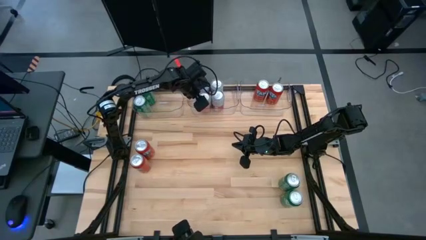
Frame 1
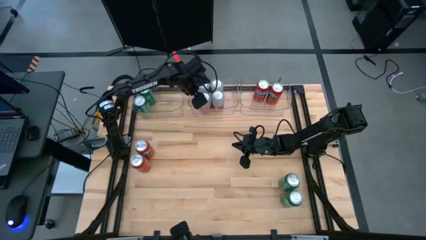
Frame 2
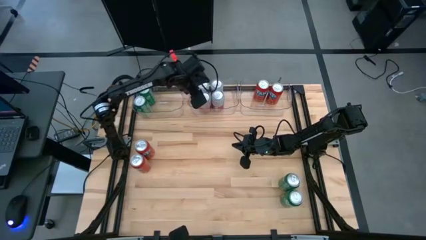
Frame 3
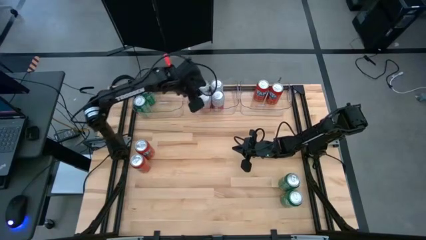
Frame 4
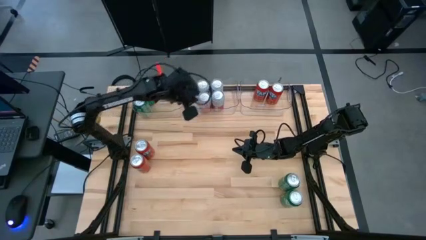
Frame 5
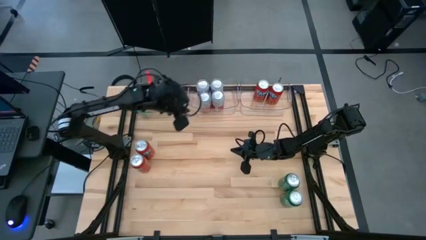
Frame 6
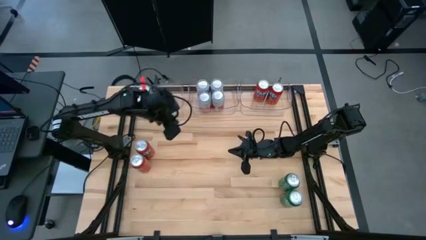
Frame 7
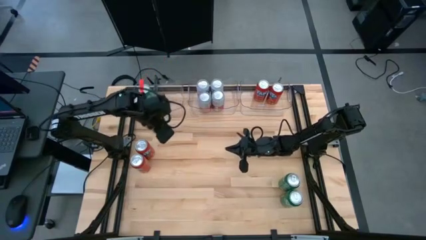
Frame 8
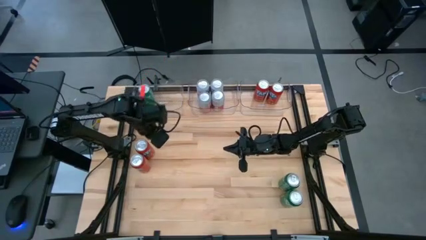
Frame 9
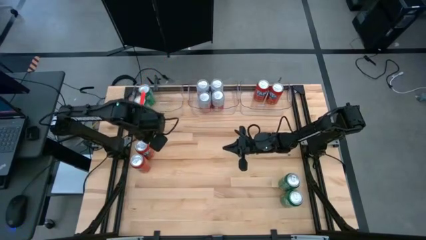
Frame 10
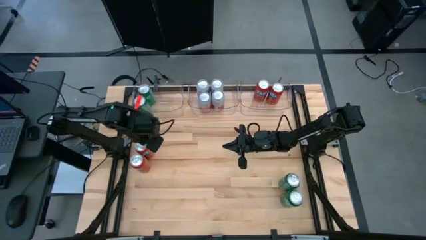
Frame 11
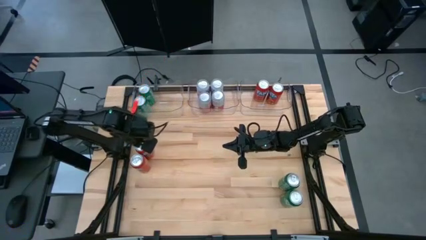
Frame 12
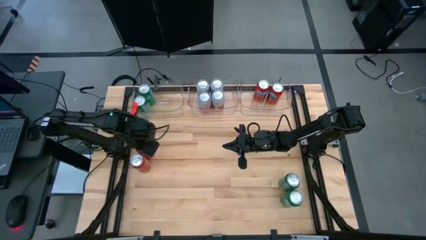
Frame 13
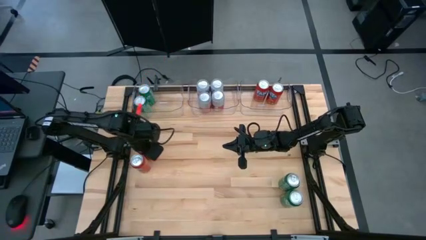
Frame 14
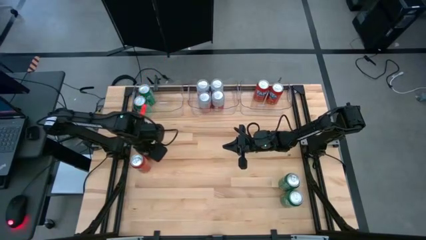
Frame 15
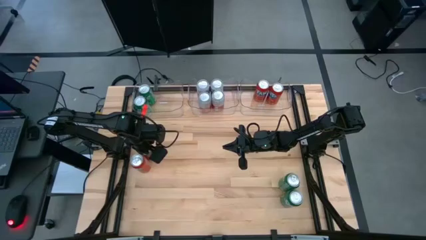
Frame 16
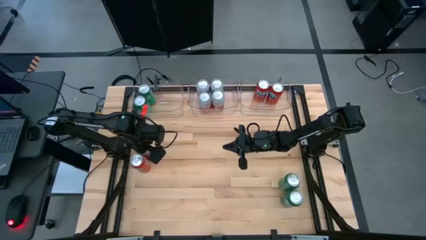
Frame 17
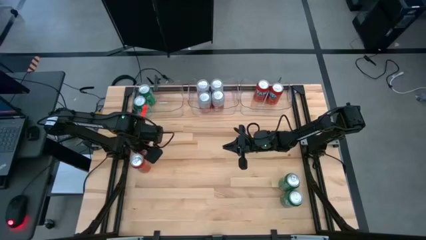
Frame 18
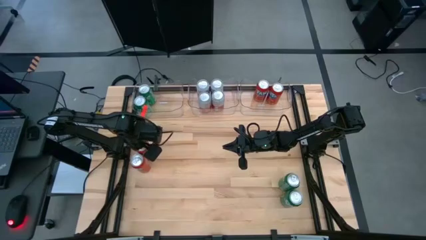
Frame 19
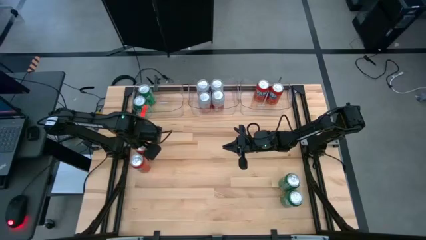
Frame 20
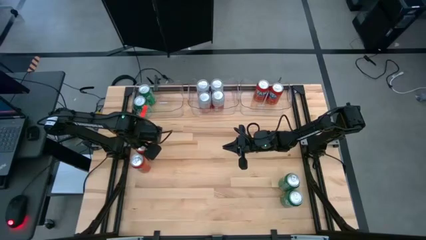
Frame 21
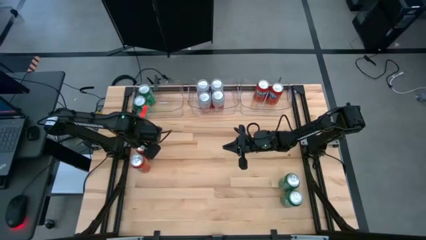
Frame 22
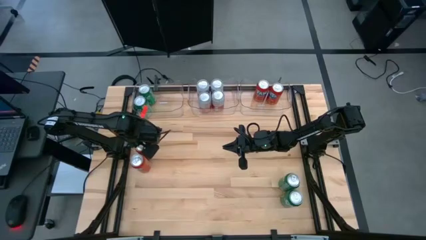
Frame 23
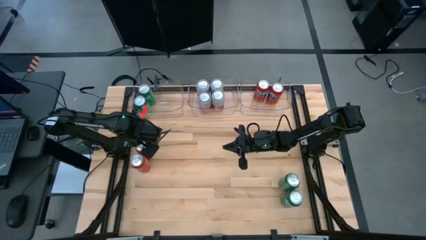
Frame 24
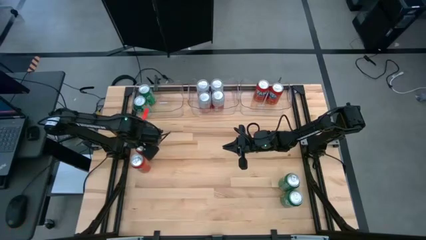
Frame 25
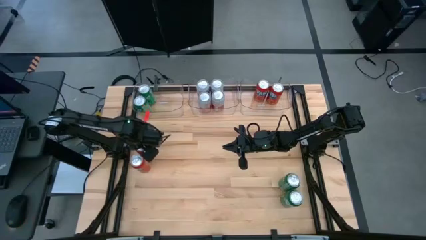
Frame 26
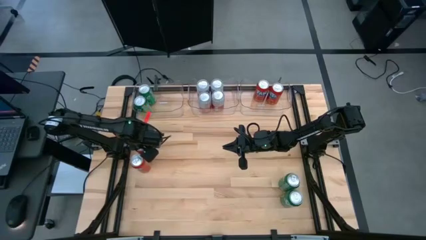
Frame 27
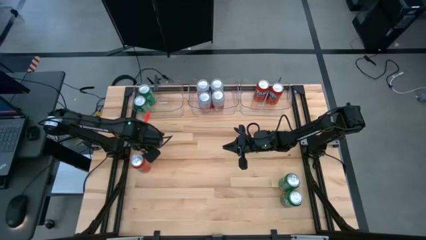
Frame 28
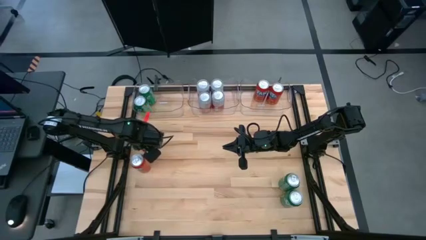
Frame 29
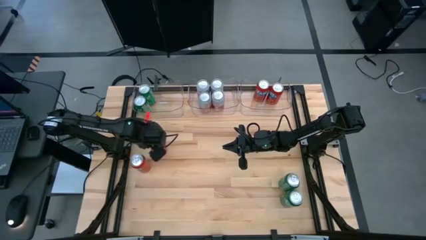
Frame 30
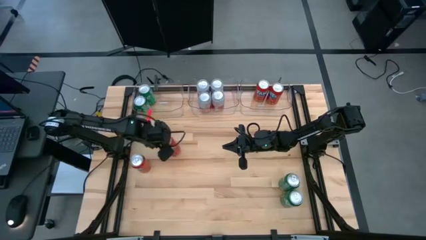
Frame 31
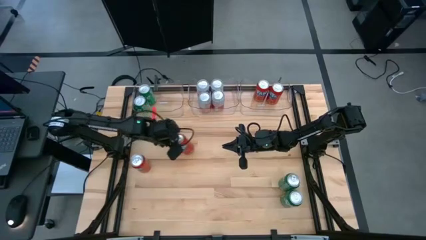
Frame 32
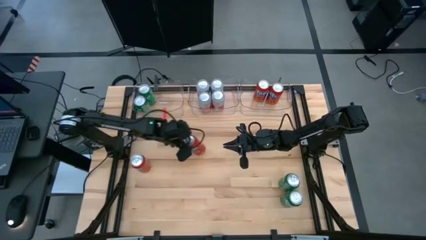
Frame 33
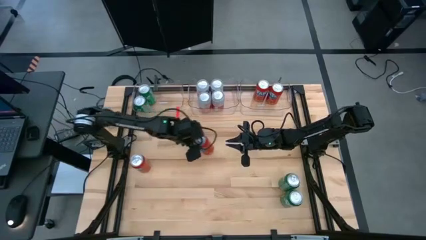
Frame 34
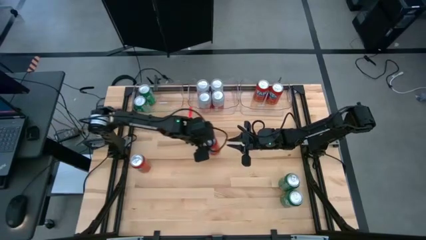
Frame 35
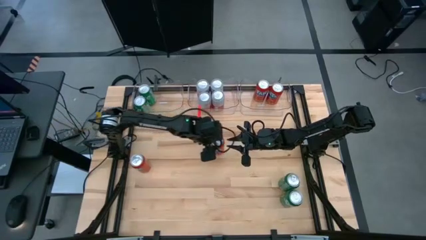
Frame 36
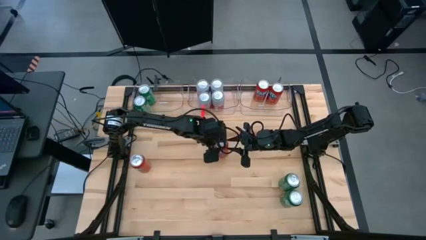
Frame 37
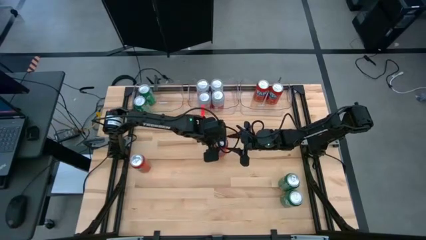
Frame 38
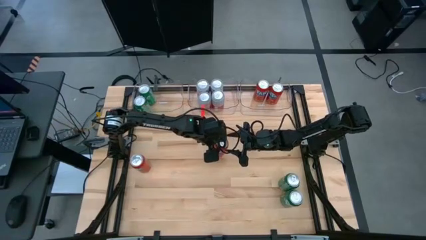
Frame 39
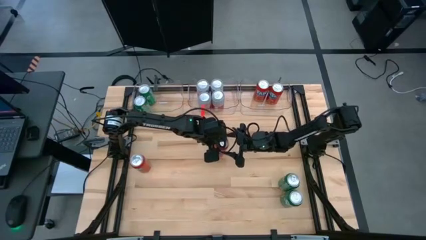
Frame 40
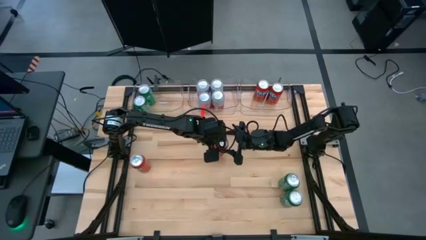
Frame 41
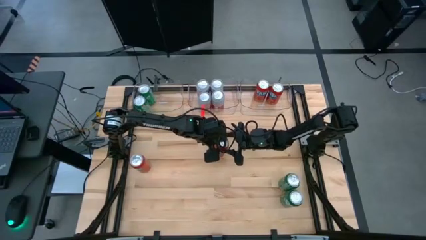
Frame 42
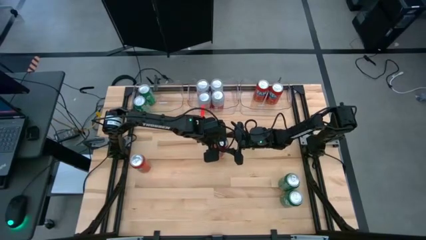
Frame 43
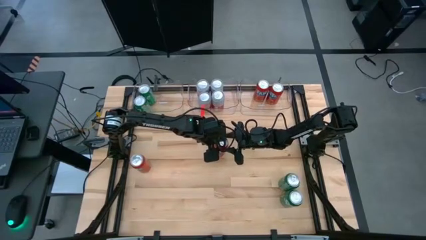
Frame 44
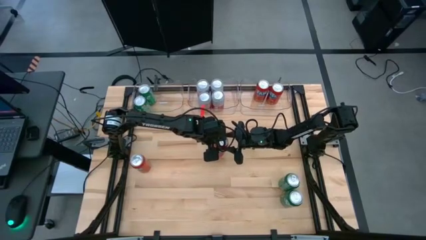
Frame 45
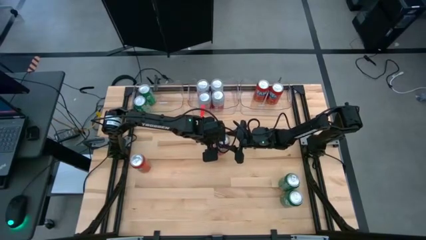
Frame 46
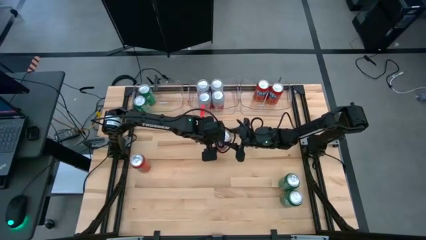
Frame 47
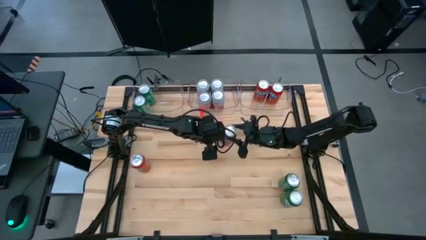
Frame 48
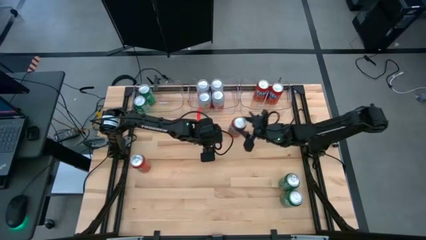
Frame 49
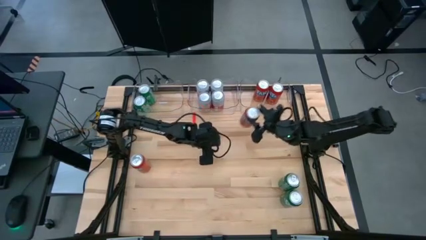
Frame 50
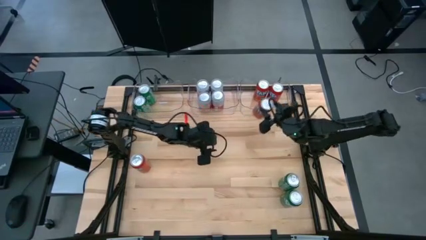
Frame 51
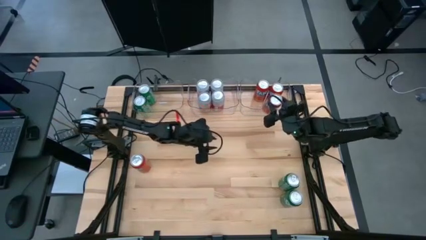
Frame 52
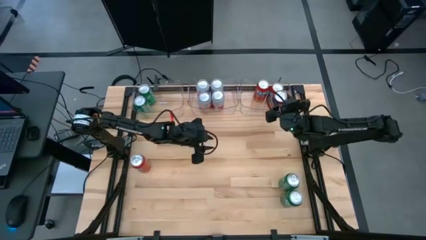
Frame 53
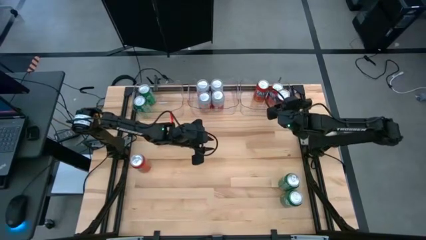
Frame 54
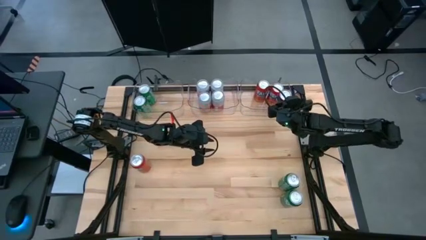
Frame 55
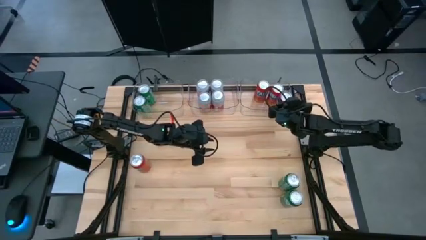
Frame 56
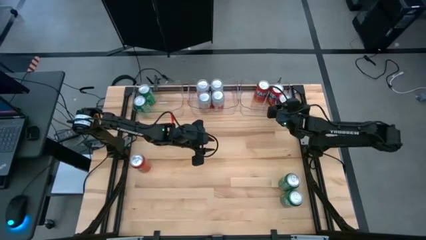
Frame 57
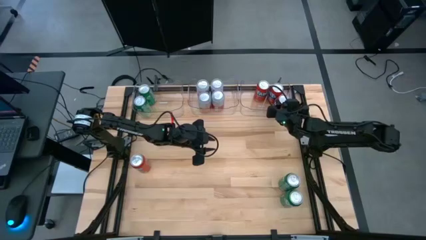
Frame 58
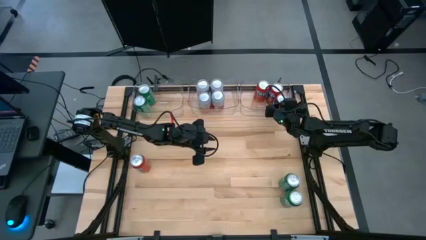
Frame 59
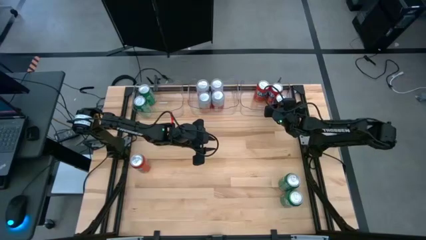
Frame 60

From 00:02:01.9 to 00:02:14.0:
Task: Sort soda cans
Put the red soda can into the top right transparent bin

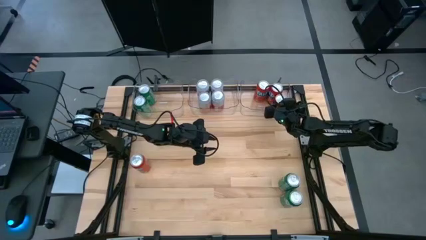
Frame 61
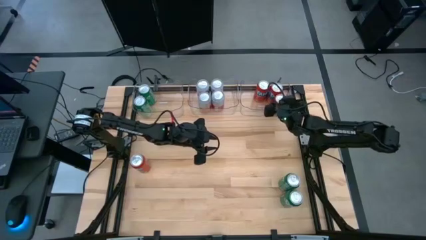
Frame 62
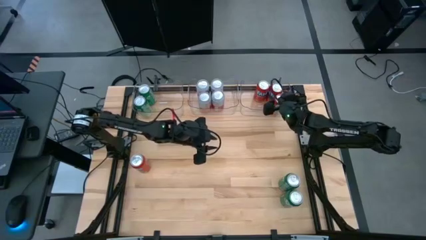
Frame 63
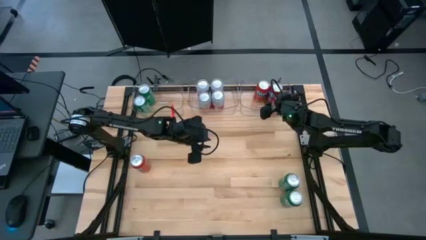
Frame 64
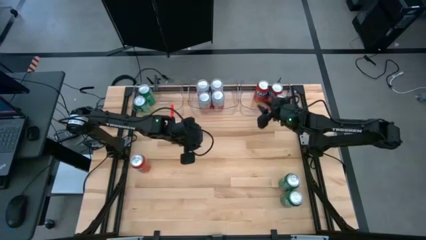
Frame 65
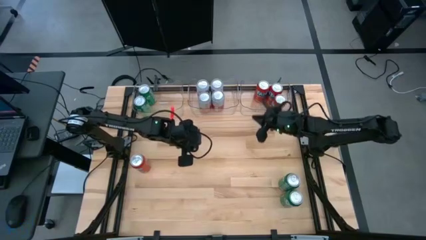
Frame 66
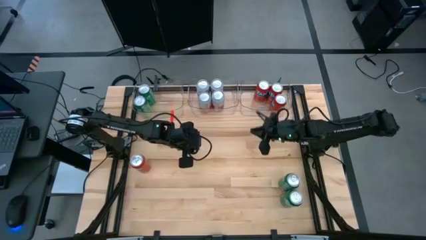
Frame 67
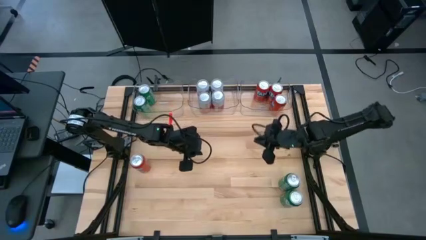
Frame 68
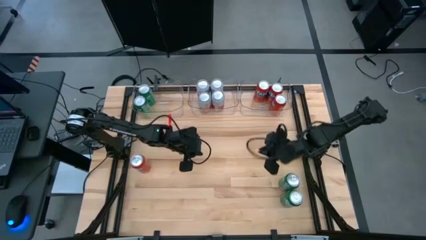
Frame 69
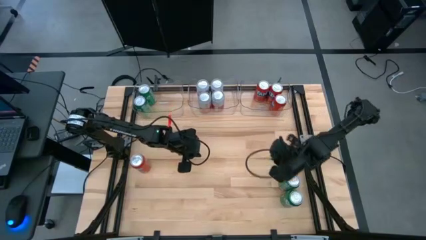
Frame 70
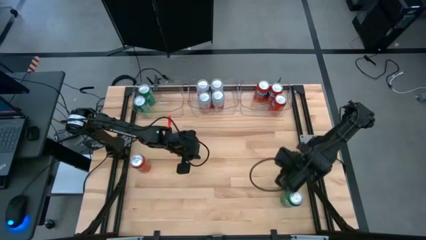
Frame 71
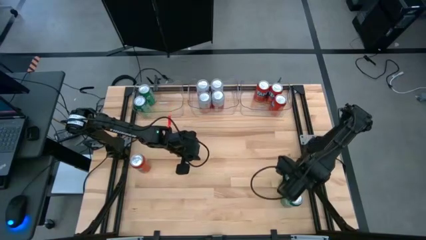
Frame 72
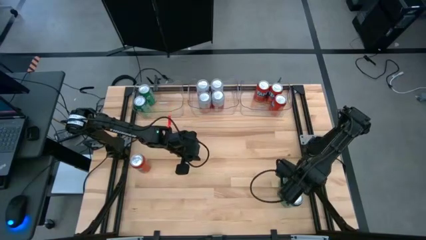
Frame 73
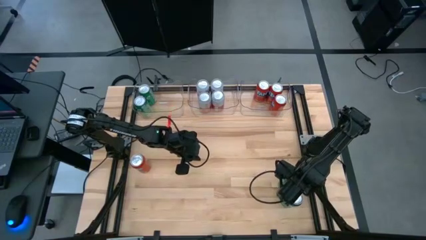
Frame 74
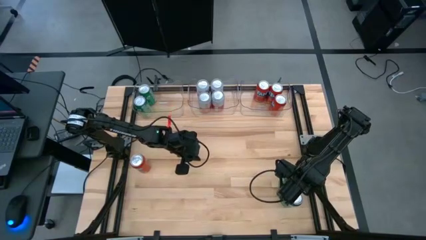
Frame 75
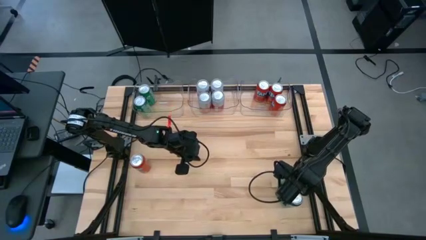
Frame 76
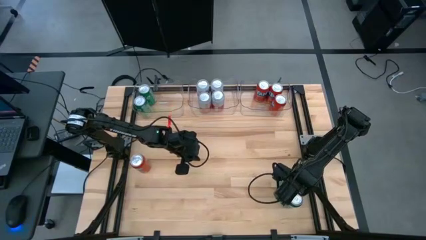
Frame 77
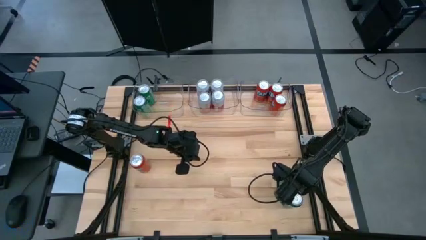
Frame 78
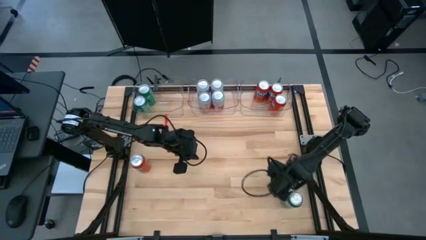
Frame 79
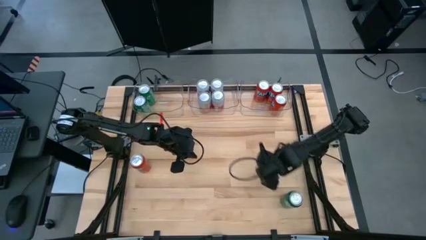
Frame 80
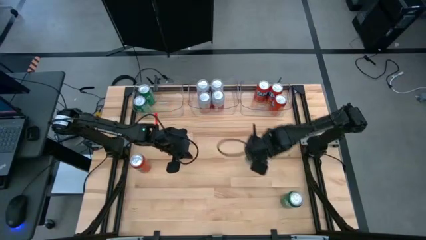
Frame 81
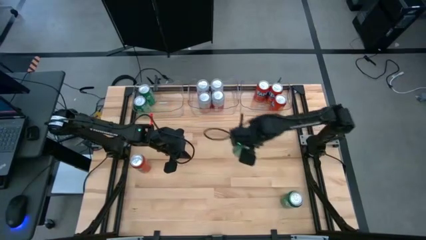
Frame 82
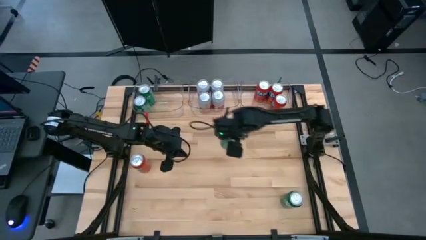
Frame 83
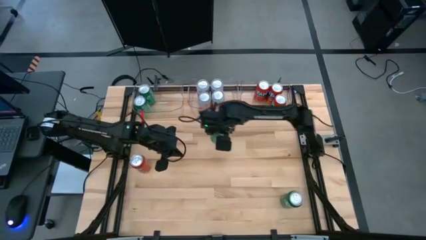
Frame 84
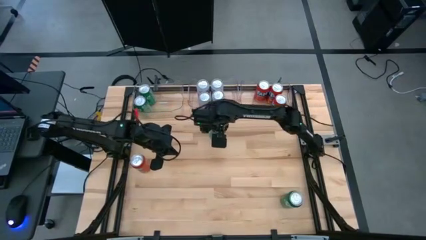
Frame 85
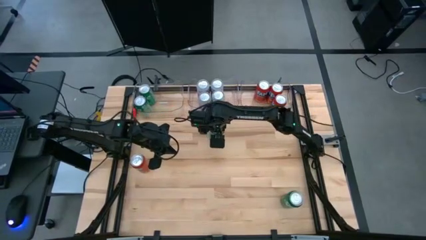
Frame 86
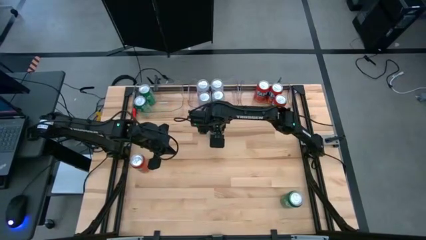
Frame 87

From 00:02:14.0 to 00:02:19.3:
Move the green soda can to the top center of the table
